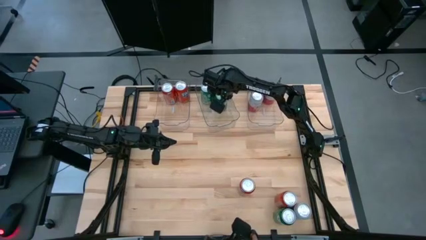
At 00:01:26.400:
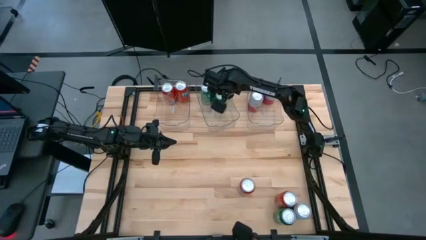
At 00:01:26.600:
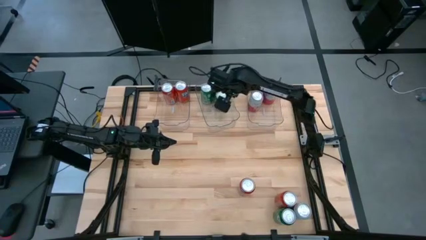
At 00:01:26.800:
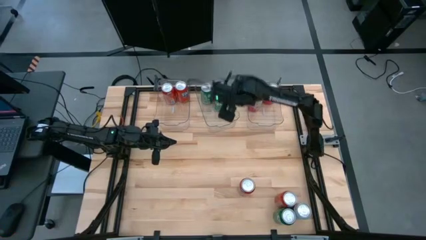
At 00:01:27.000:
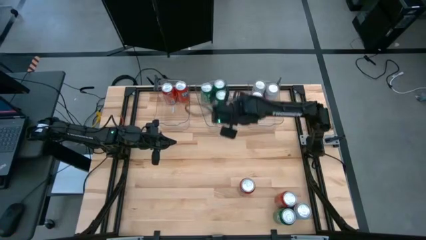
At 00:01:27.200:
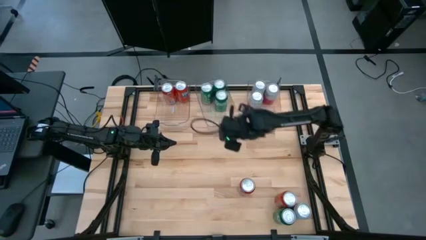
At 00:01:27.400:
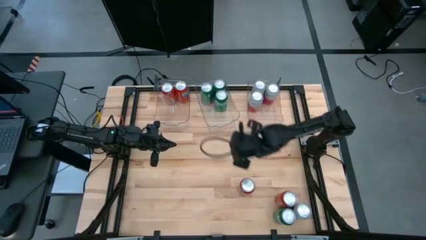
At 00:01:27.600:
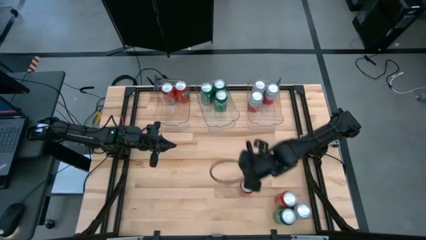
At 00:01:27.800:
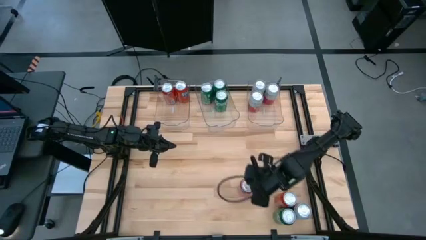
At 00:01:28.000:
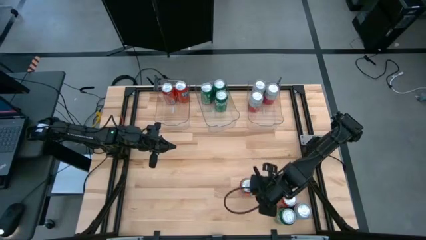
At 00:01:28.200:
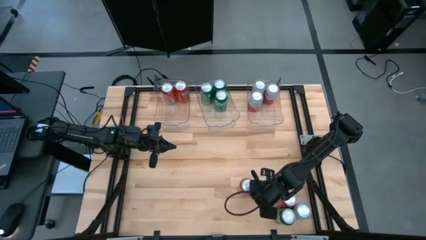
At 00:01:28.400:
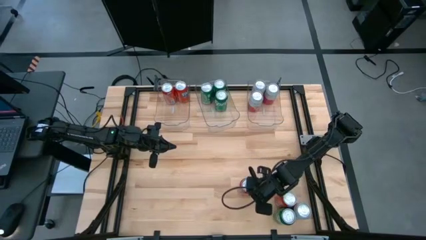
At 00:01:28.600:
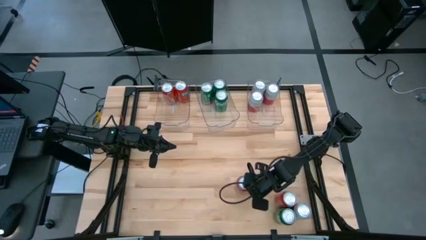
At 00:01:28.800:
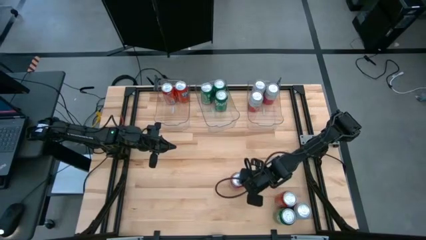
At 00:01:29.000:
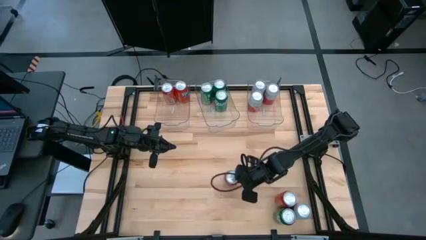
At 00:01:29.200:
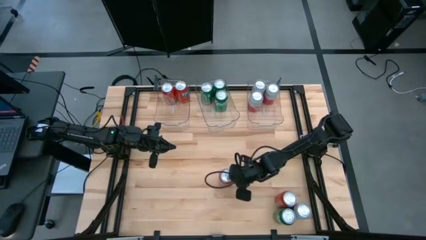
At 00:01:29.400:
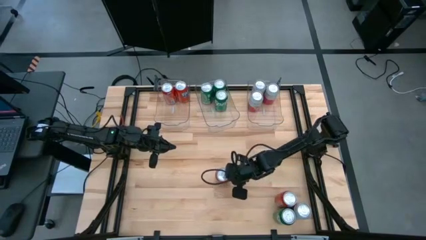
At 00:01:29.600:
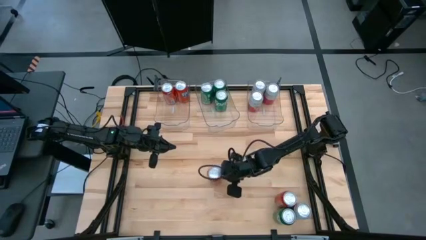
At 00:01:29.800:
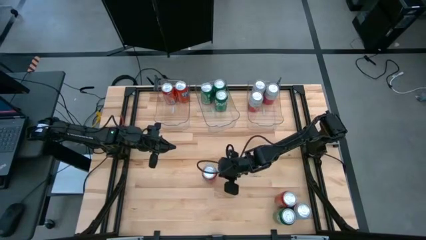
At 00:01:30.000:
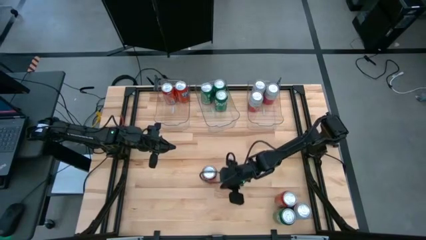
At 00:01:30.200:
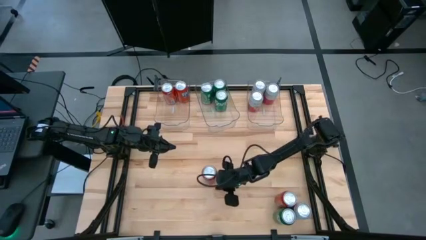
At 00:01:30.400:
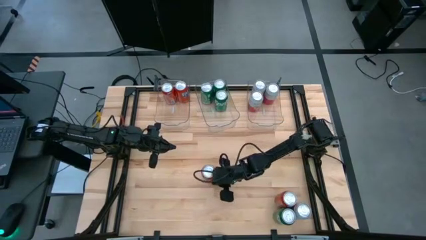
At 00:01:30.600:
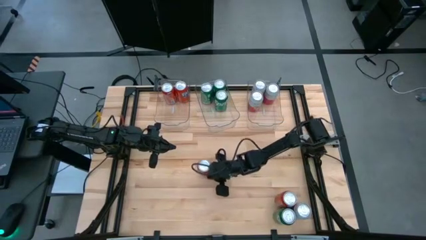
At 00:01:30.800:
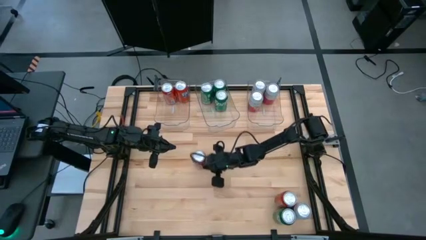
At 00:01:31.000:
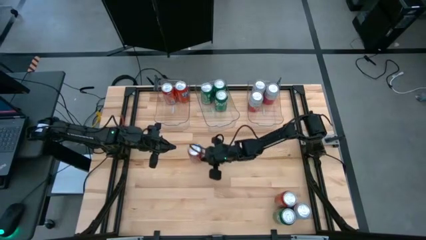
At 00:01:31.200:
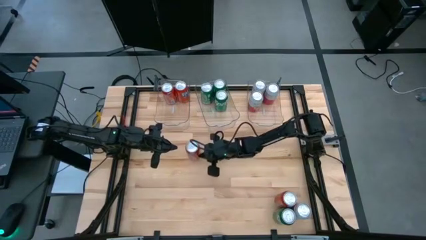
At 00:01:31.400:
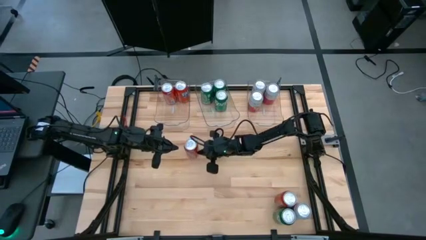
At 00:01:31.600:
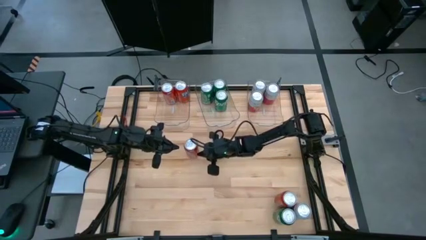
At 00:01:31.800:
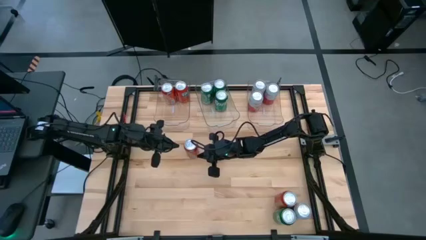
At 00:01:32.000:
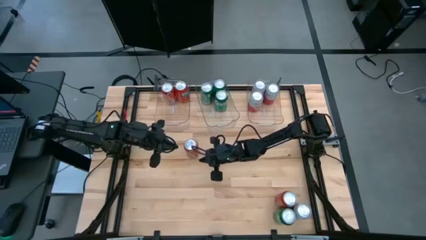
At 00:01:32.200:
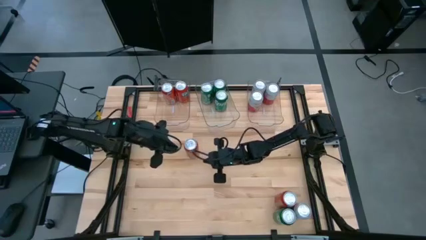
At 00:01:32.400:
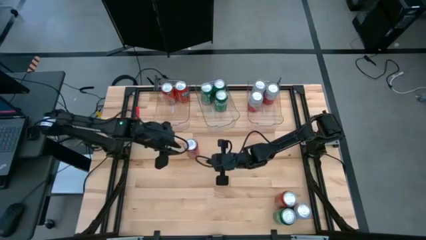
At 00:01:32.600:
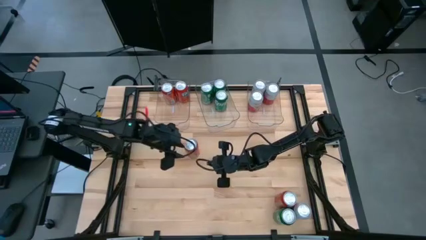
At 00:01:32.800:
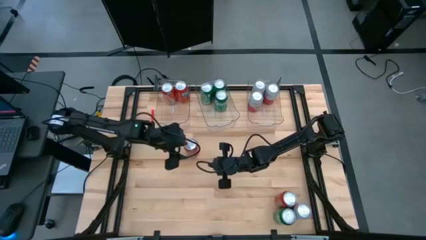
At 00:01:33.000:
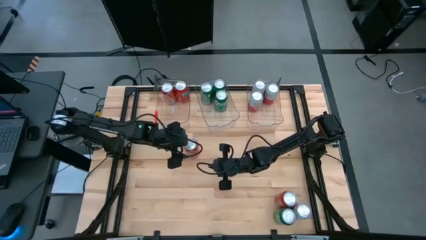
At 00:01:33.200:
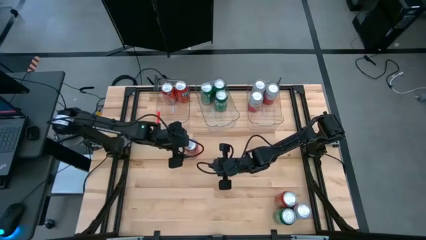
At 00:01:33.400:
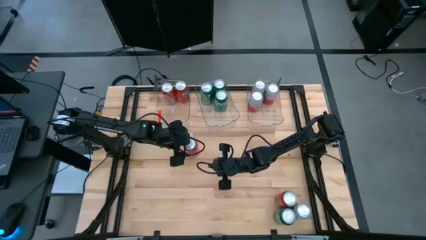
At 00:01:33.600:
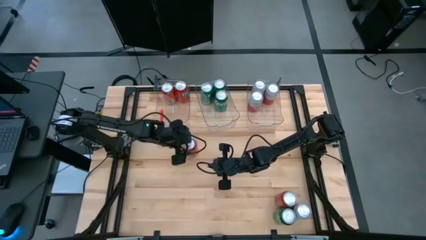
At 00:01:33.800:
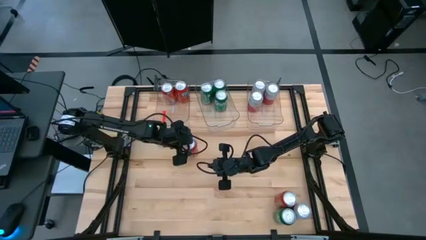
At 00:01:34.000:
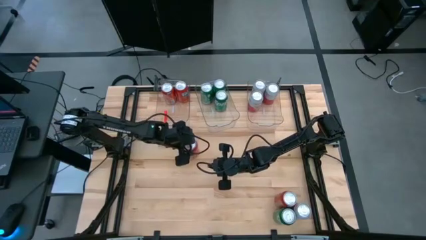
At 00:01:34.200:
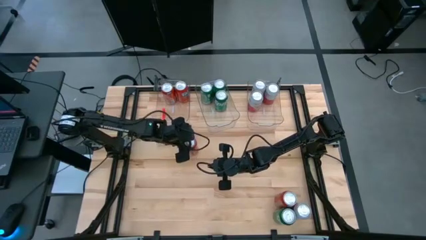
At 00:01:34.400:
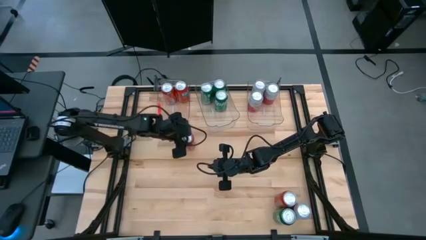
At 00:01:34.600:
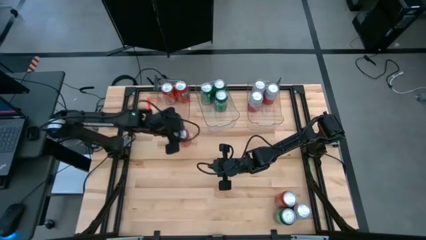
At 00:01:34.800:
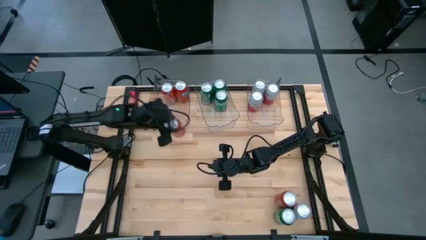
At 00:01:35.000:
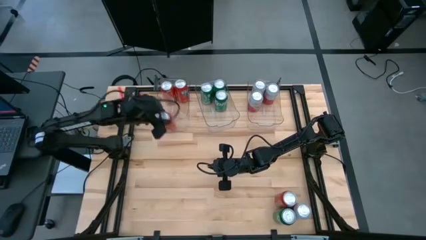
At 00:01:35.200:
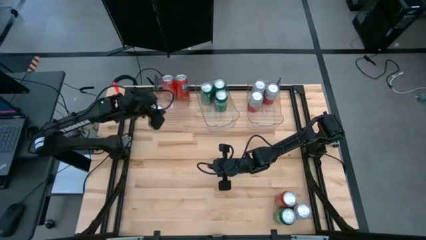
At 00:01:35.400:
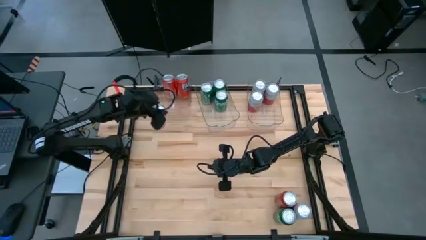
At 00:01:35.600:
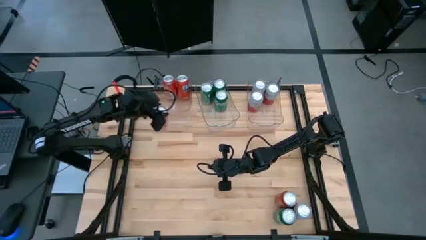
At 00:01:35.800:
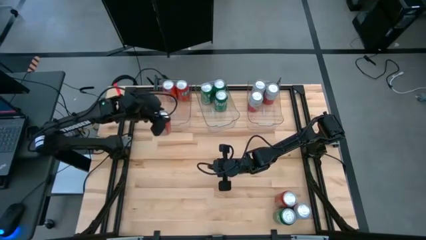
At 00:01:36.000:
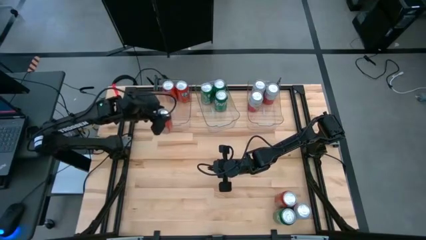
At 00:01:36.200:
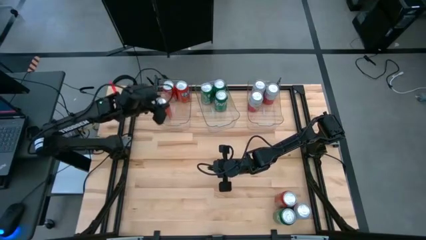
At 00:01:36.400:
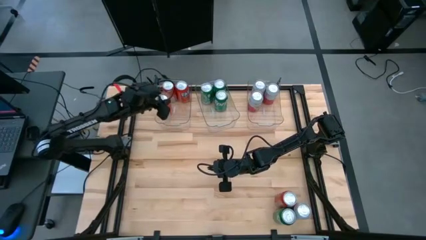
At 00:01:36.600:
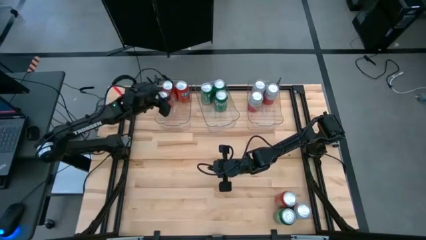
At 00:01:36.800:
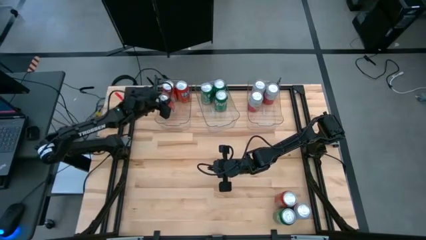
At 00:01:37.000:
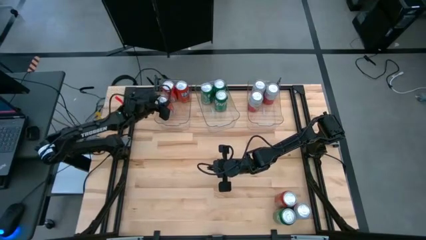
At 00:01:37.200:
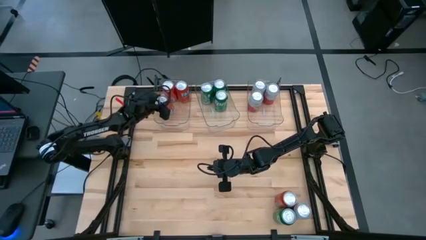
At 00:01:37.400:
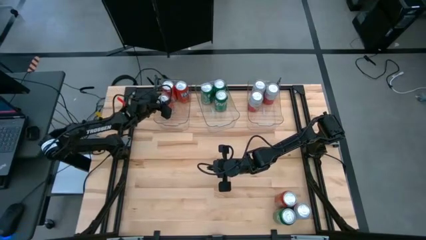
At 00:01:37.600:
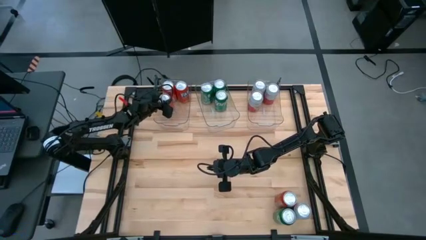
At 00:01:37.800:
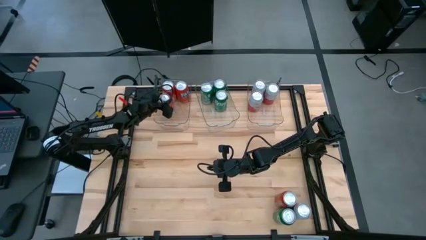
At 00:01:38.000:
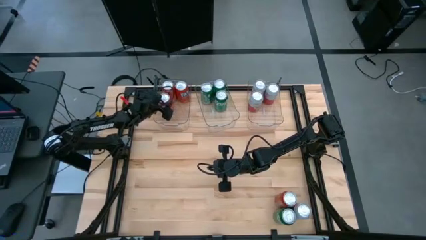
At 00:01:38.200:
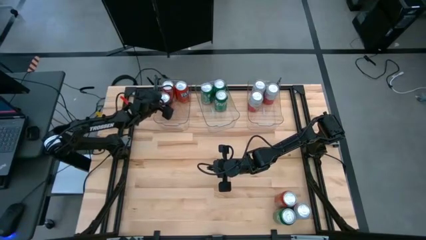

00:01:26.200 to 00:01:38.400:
Task: Sort soda cans
Put the left red soda can into the left transparent bin
